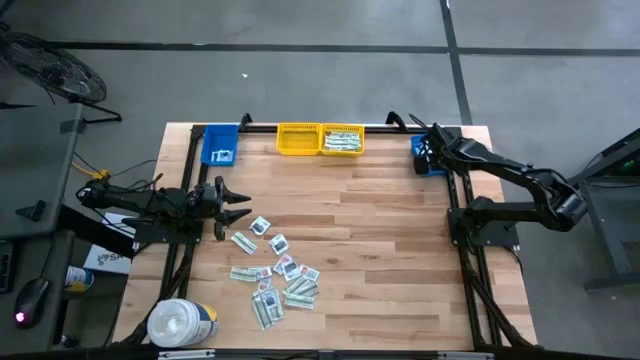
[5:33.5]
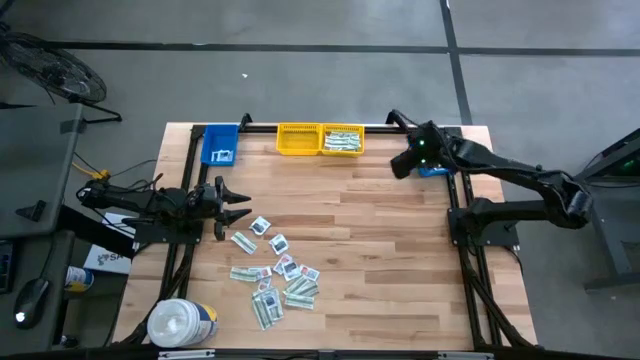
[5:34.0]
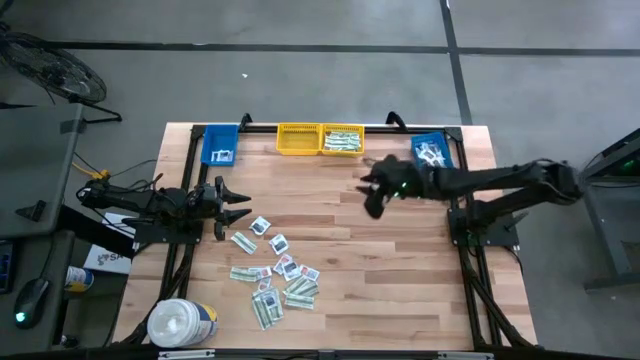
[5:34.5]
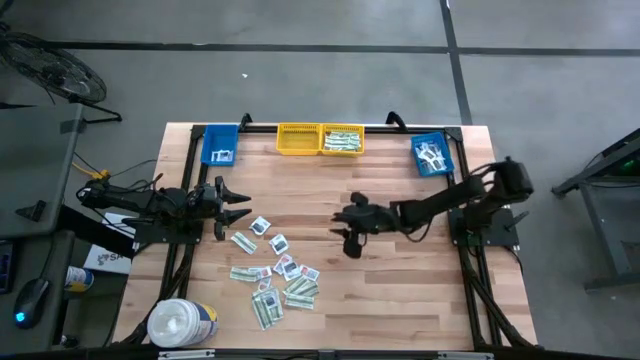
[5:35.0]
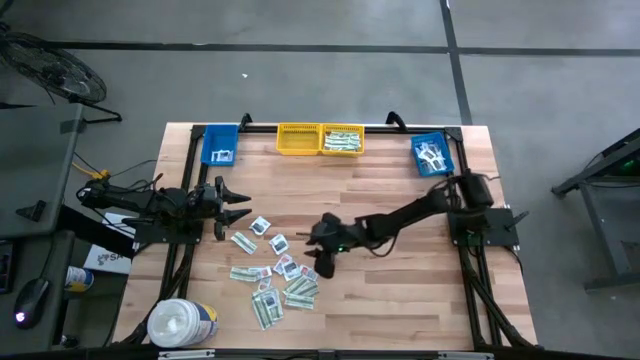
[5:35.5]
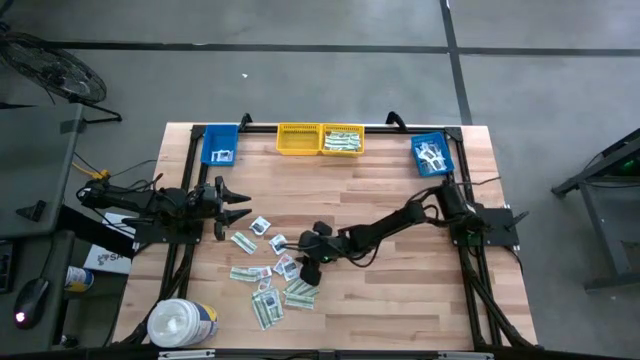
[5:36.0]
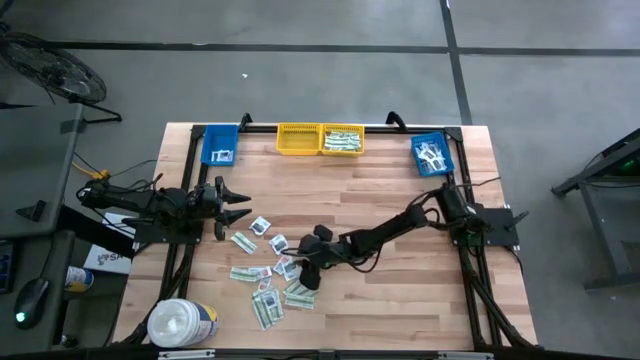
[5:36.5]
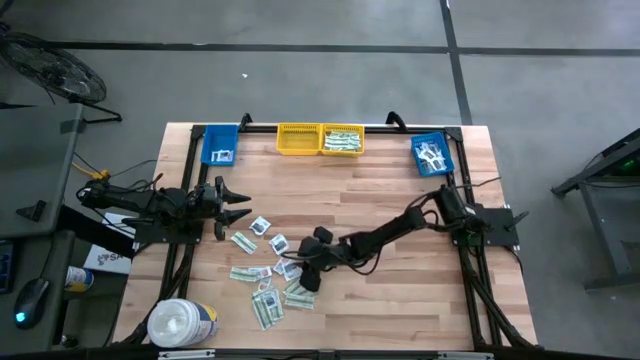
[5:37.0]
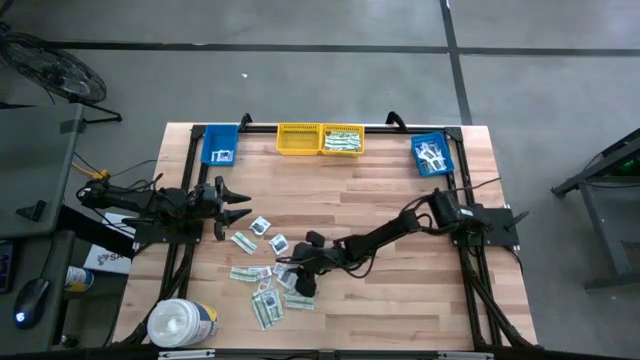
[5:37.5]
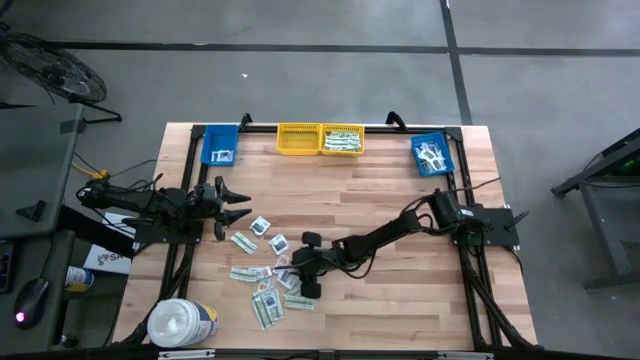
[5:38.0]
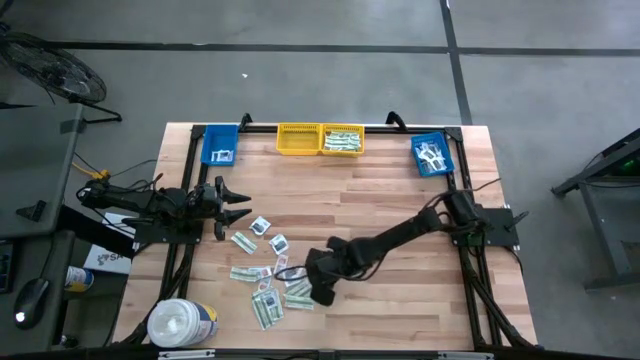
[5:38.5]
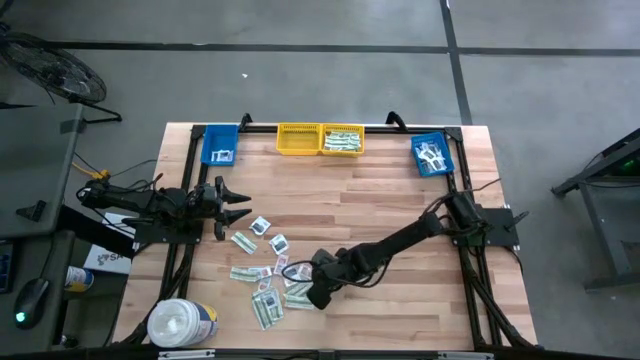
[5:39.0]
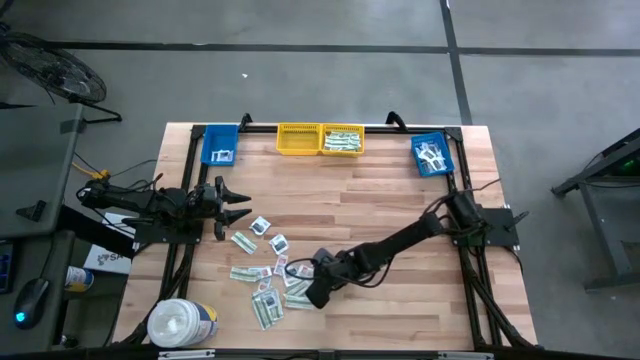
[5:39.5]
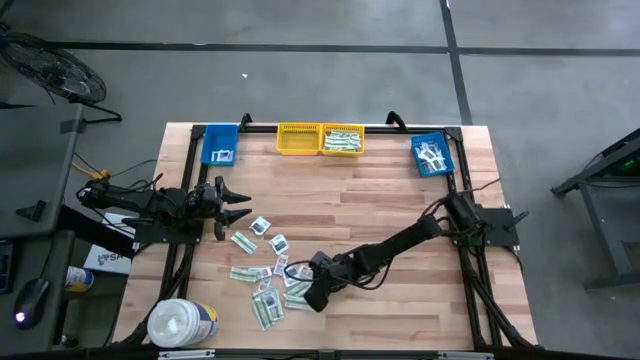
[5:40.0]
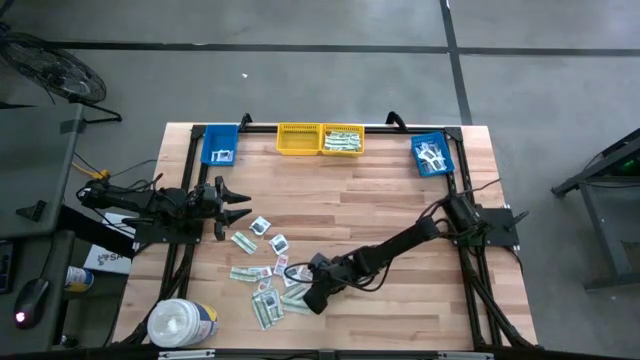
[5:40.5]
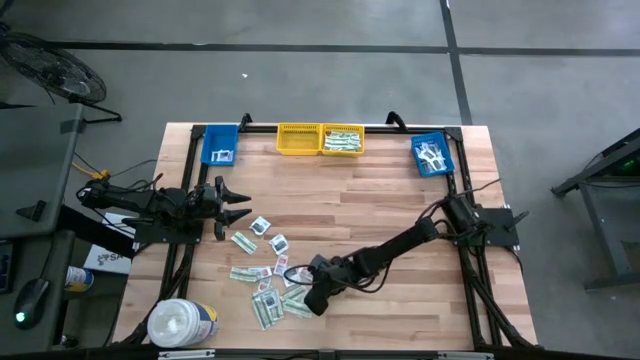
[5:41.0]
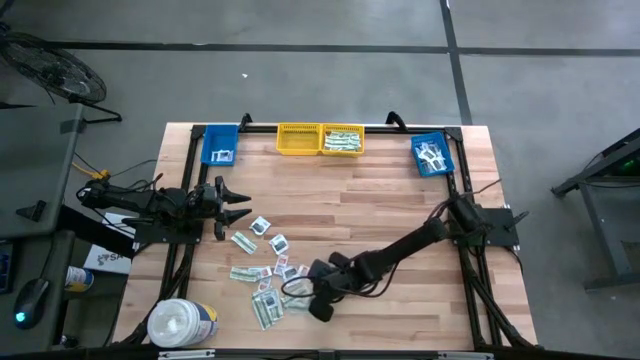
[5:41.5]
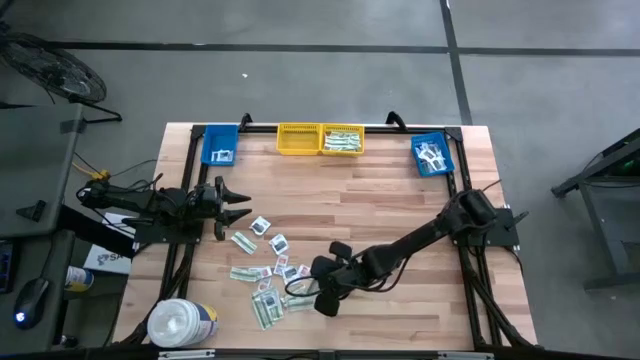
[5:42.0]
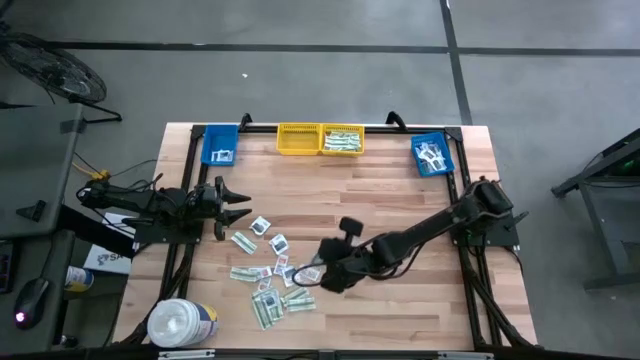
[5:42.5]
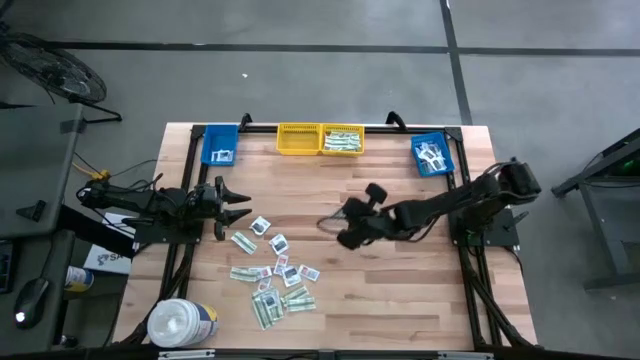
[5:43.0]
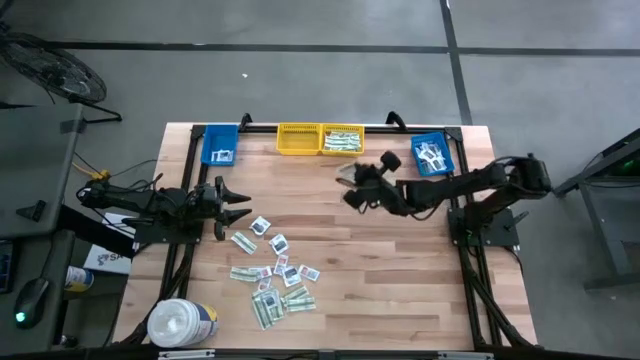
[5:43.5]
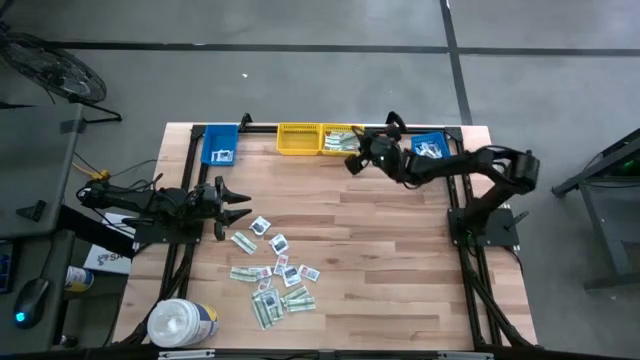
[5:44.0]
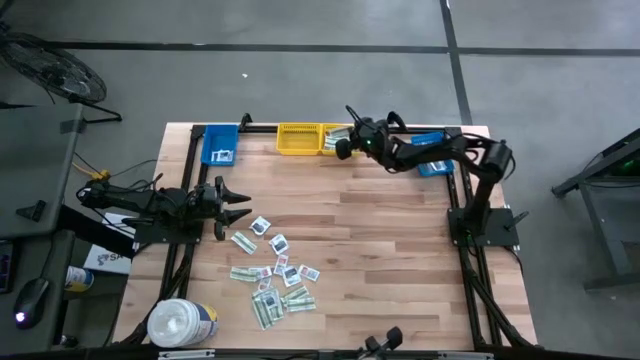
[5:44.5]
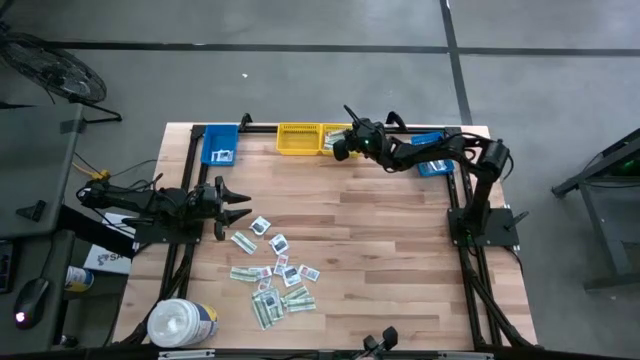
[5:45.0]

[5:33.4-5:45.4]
Task: Pick & Place First Aid Supplies
Put the green bandage pack into the right yellow bin

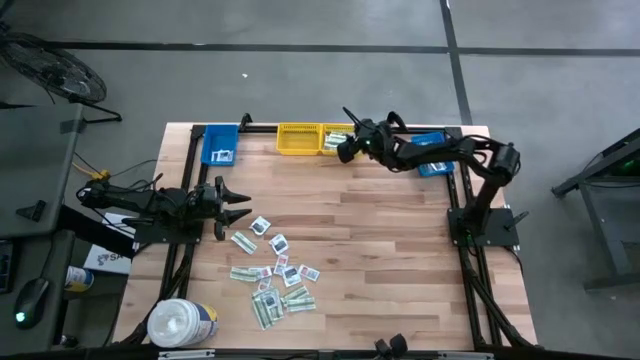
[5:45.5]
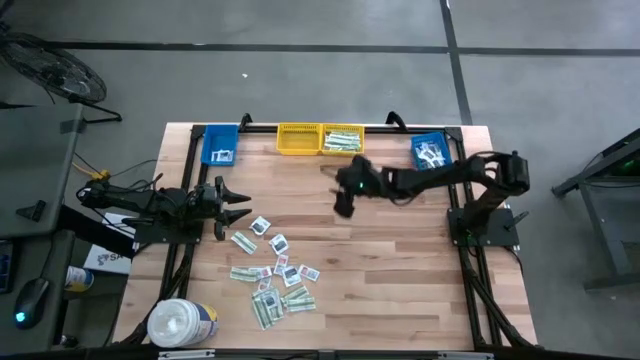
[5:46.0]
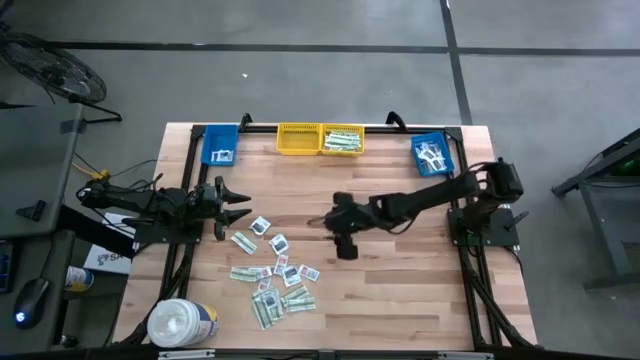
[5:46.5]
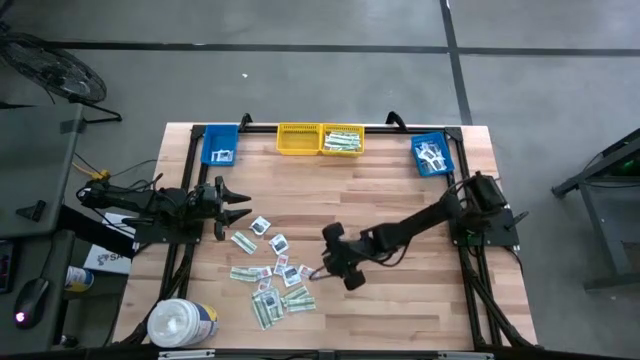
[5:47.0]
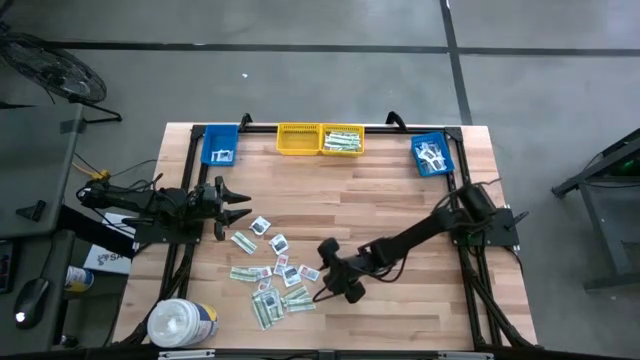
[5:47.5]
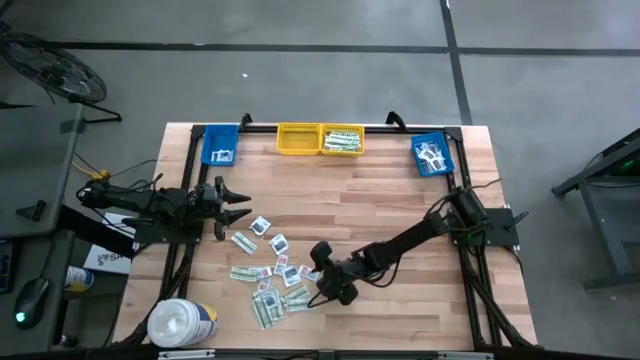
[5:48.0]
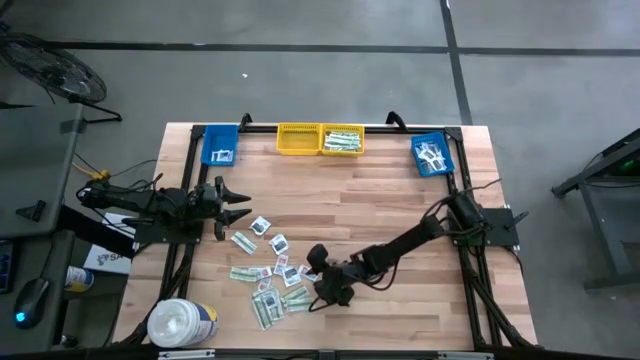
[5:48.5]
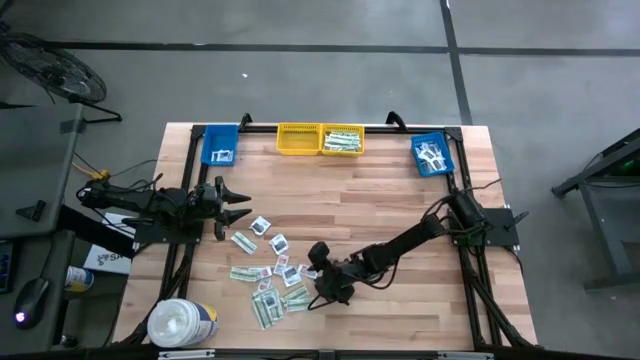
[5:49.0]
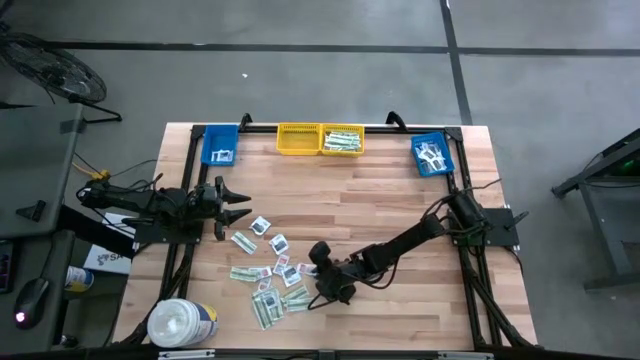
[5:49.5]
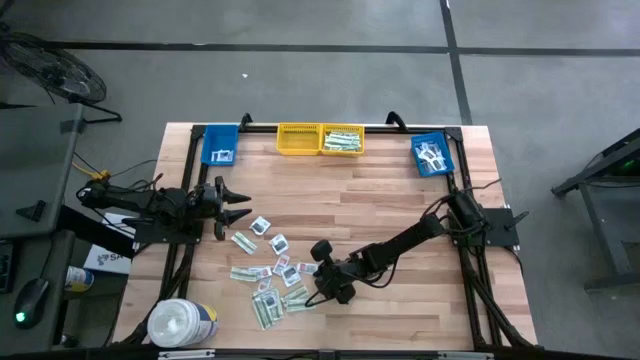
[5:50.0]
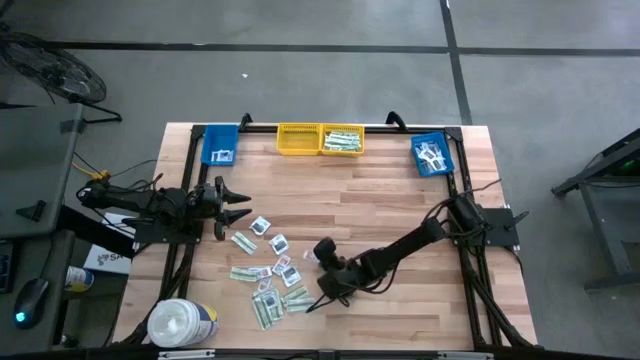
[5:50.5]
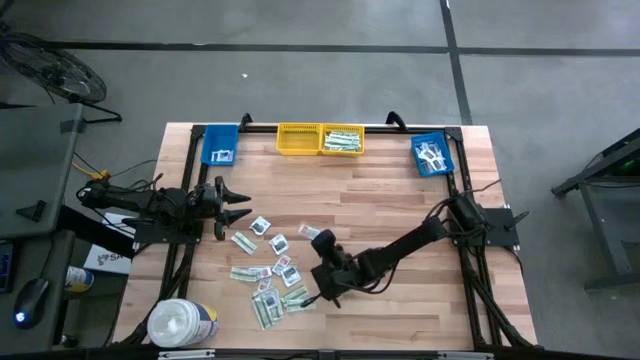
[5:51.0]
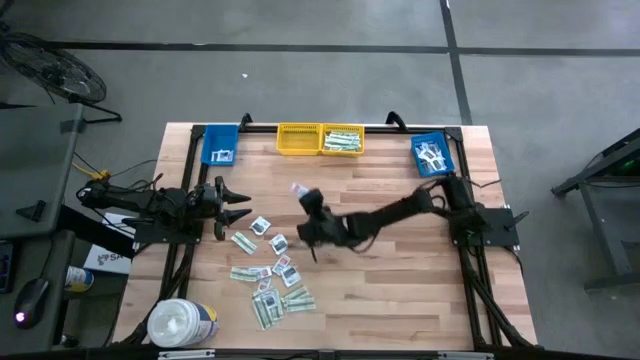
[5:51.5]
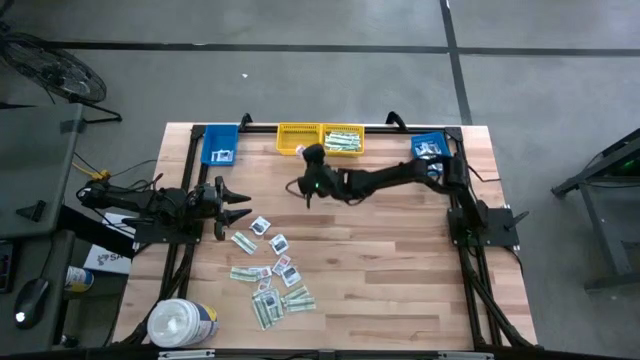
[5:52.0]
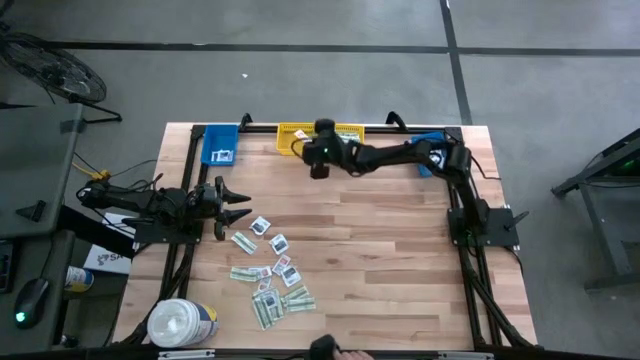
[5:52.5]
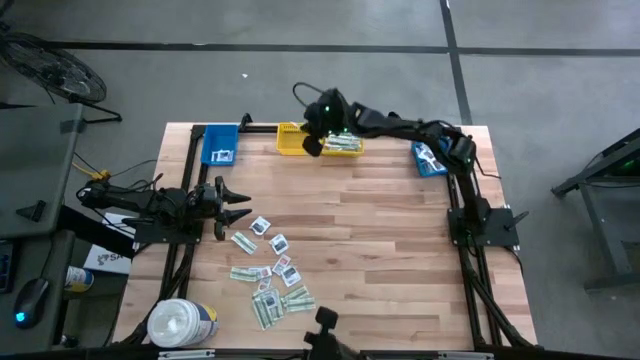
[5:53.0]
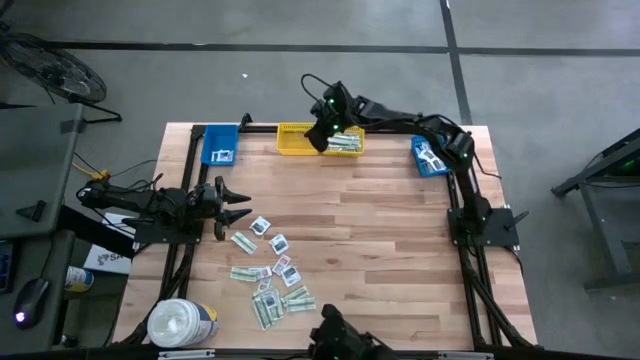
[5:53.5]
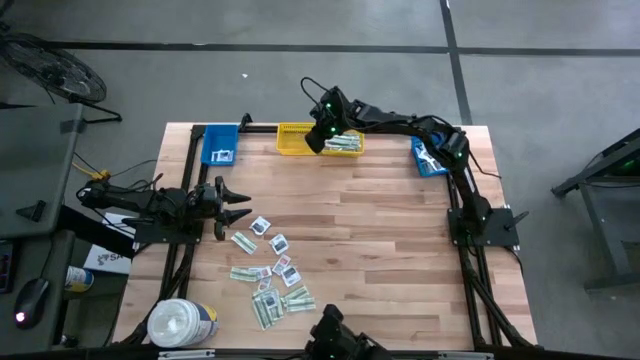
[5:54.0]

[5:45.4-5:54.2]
Put the orange ointment pack into the left yellow bin
